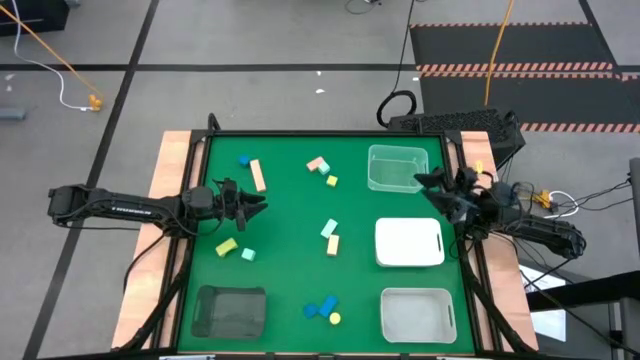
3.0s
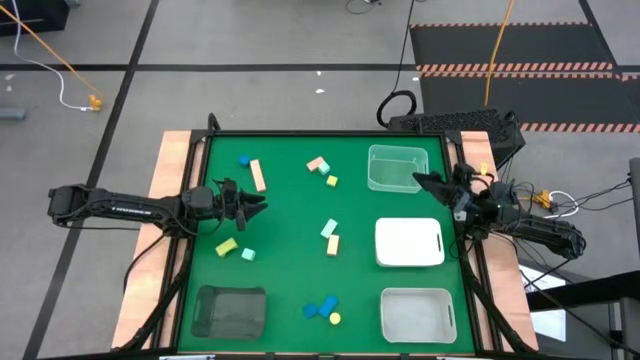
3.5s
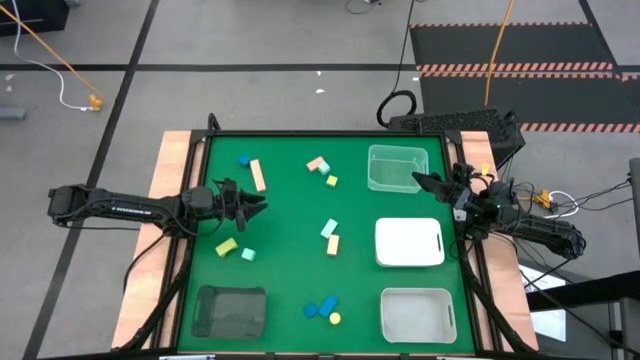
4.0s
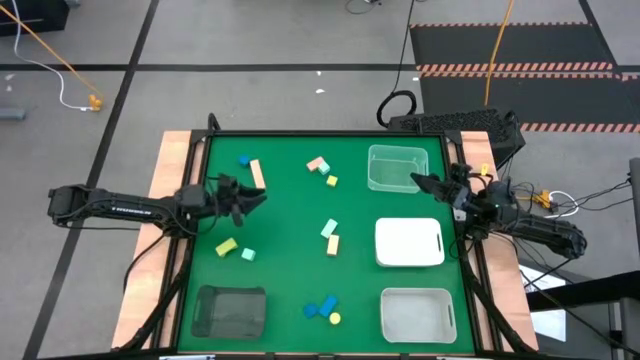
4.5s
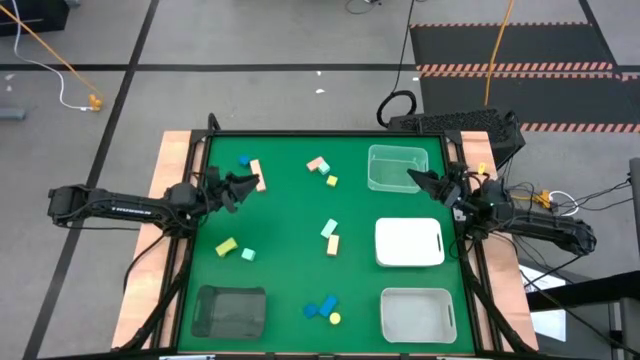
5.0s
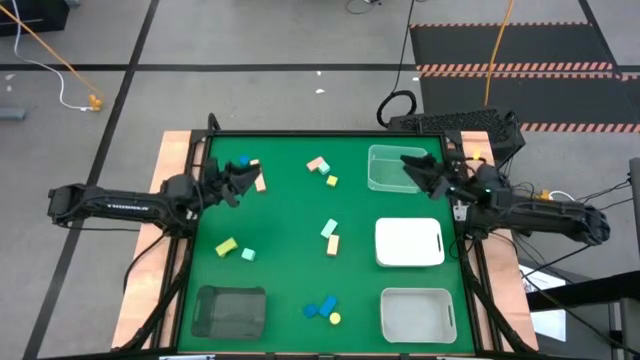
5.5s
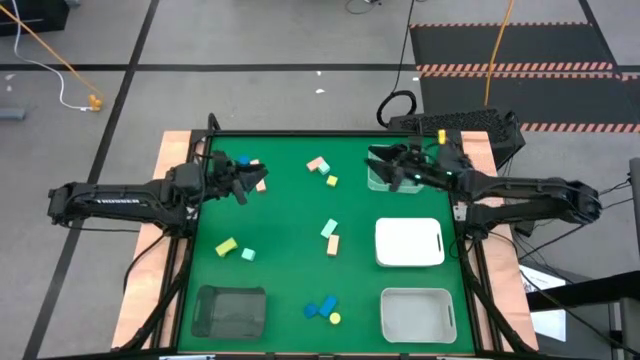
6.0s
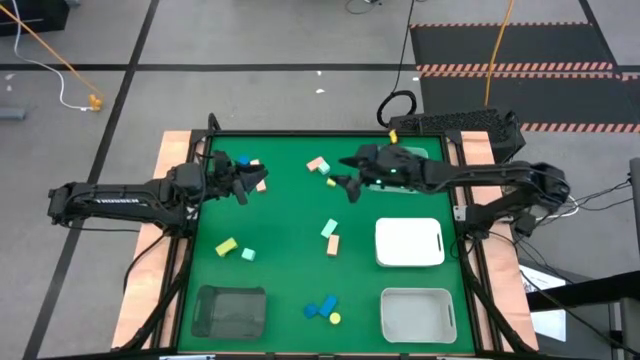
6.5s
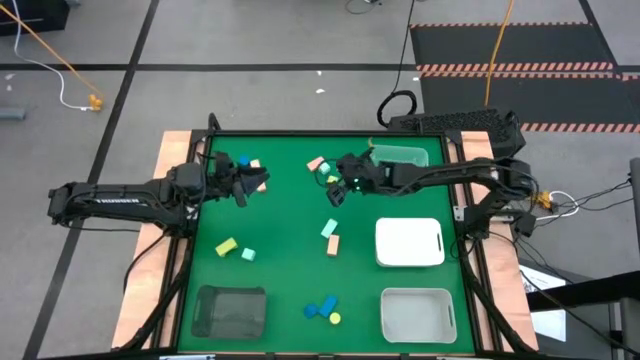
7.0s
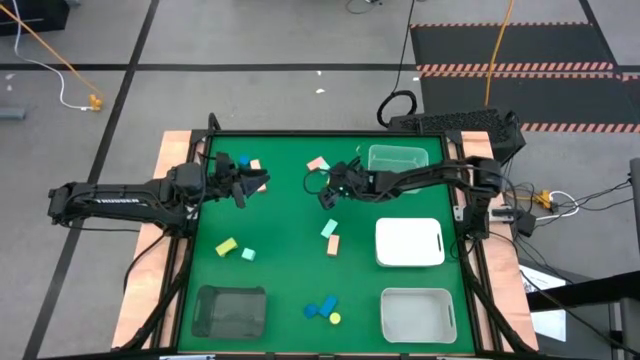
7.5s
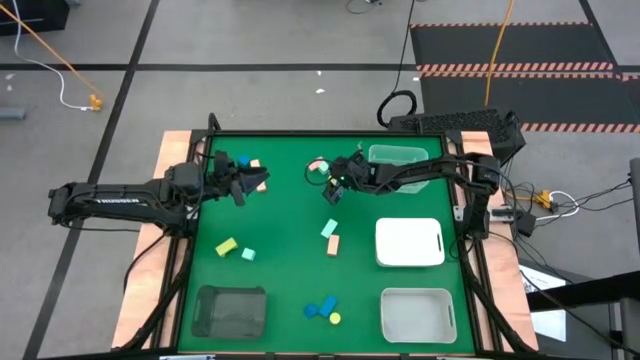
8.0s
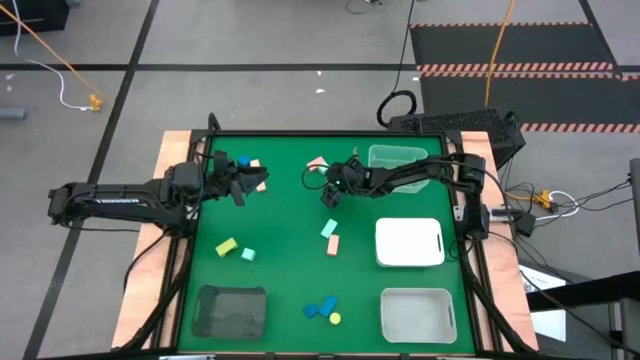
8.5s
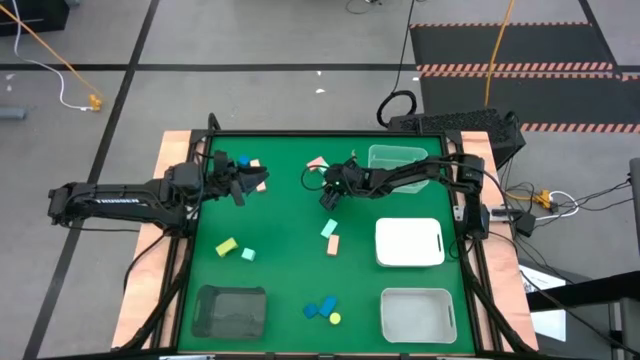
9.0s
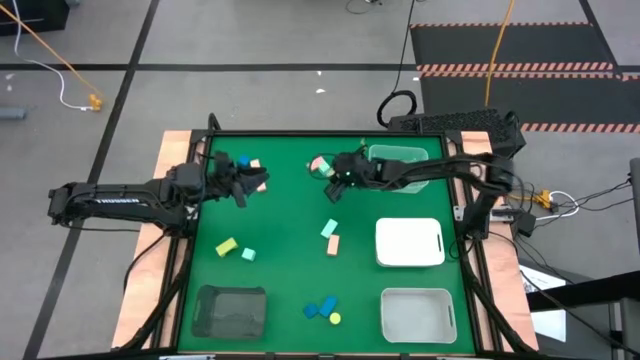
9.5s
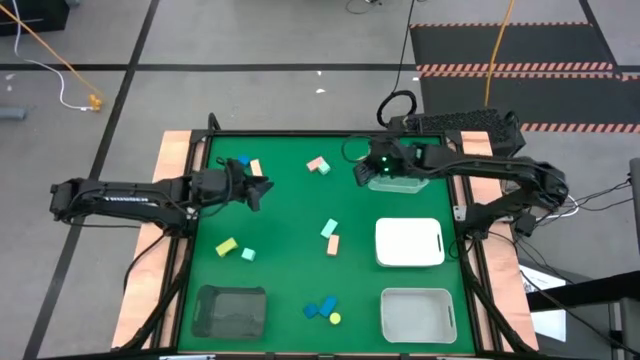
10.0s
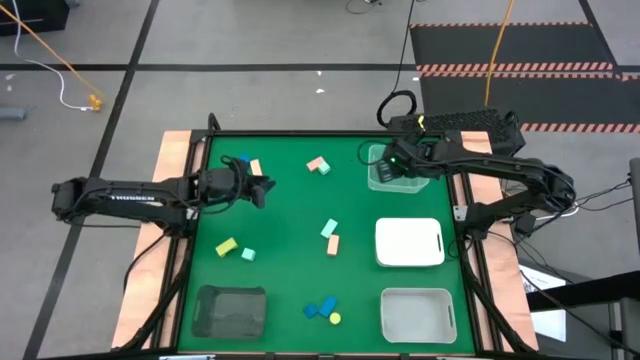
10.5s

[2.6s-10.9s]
Task: Sort & place blocks by color
Put the top yellow block into the transparent bin

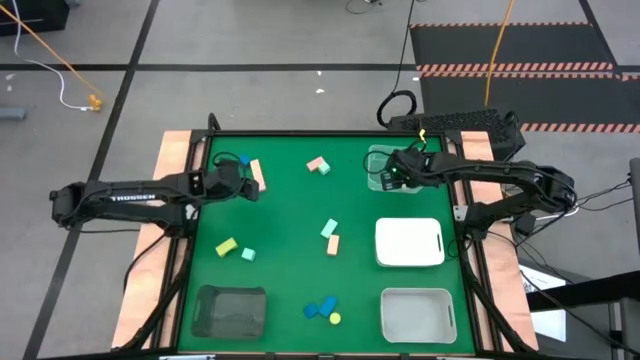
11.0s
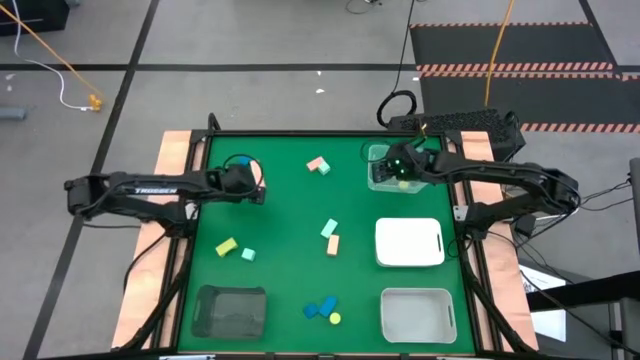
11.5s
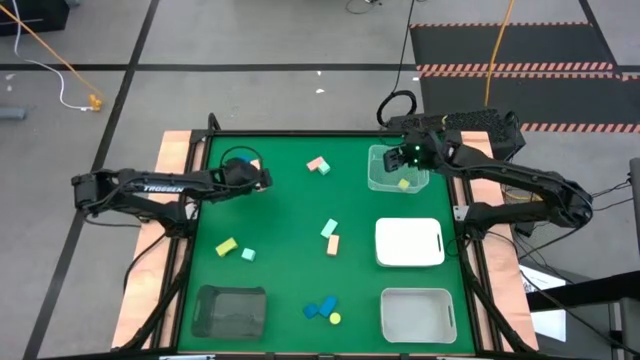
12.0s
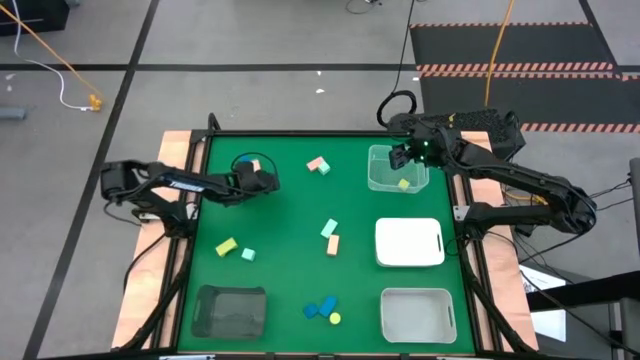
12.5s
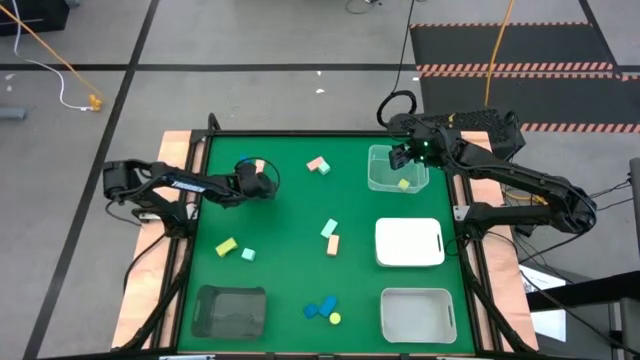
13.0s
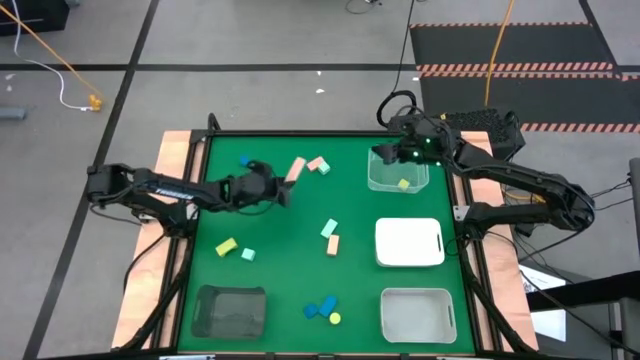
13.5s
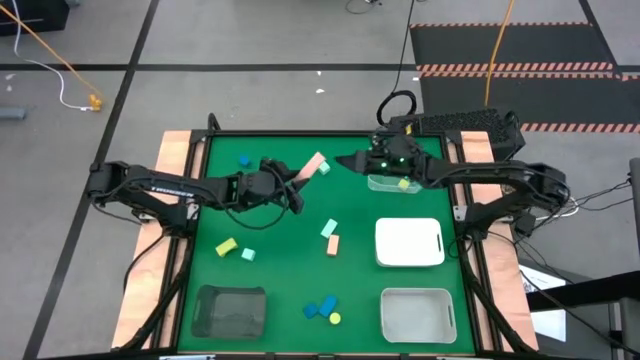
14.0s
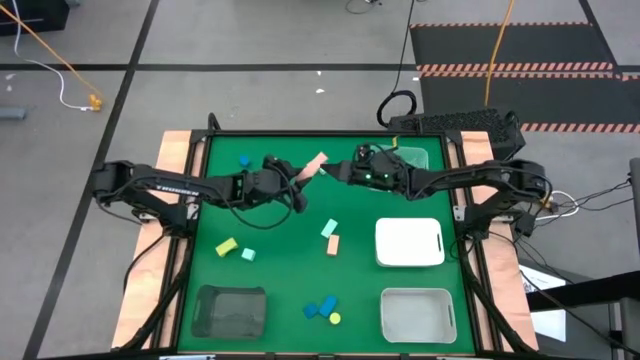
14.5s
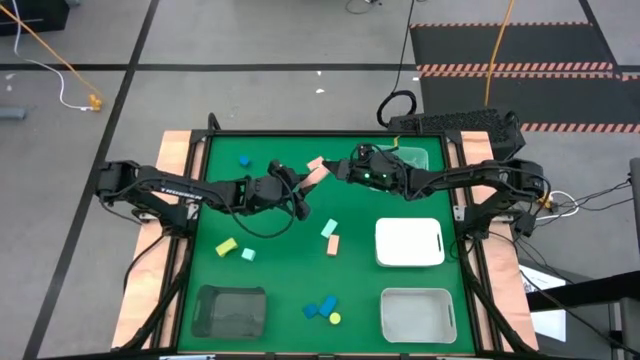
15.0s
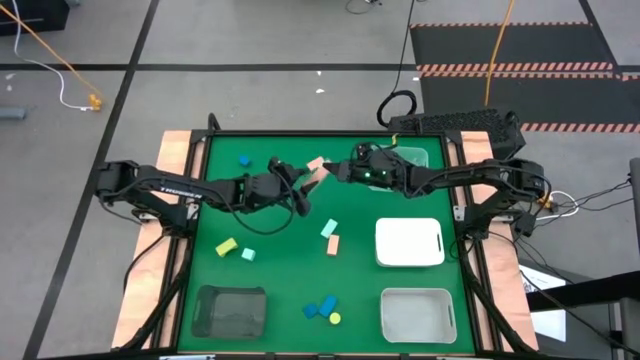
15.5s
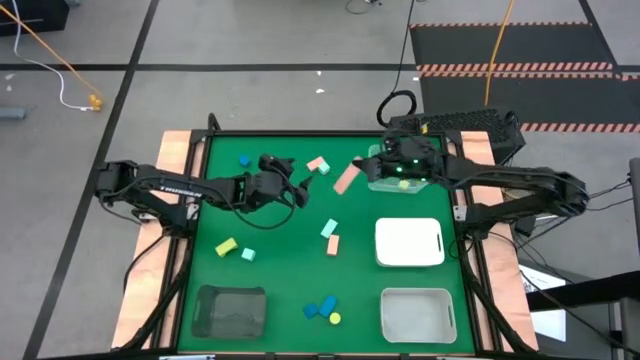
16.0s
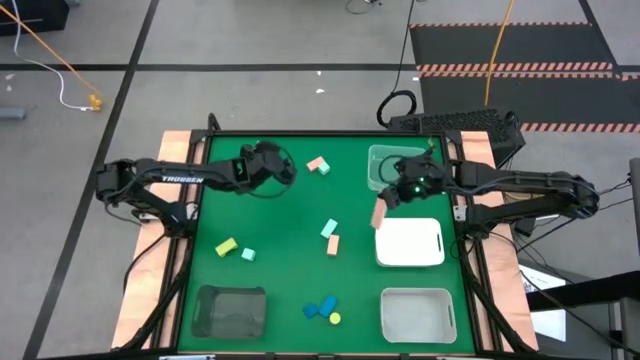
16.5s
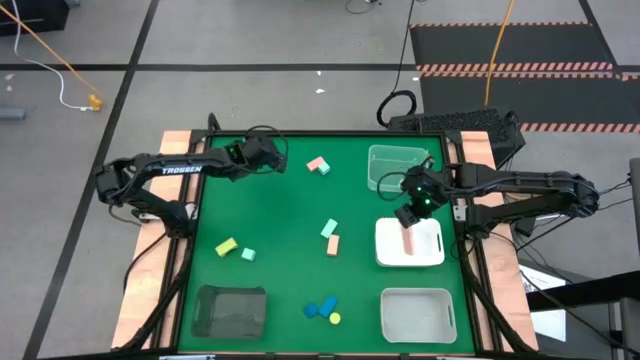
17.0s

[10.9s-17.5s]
Put the top left brown block into the white bin

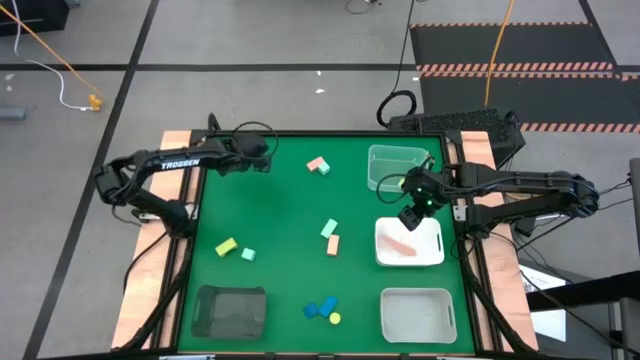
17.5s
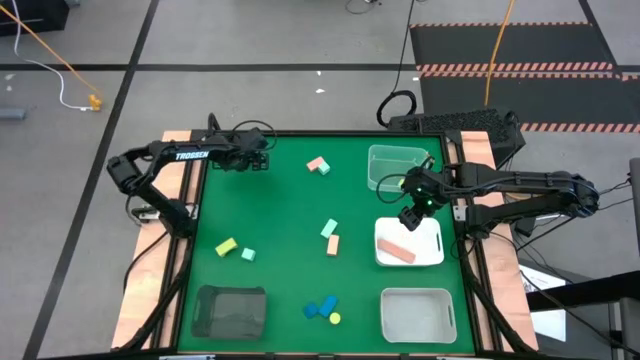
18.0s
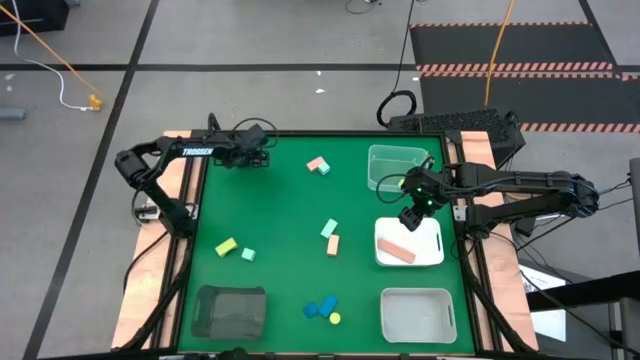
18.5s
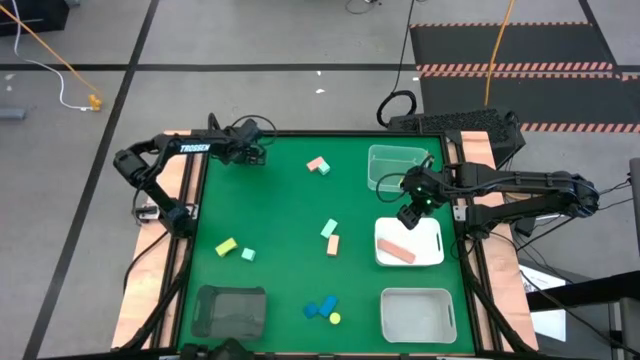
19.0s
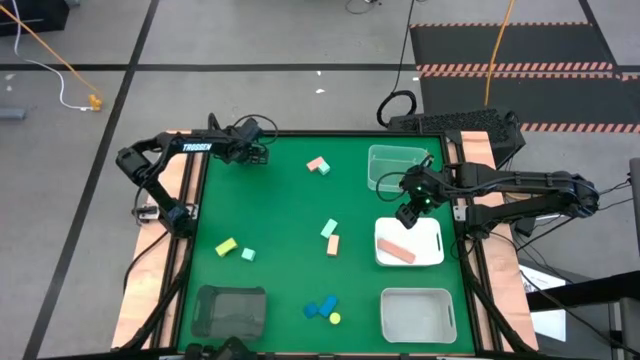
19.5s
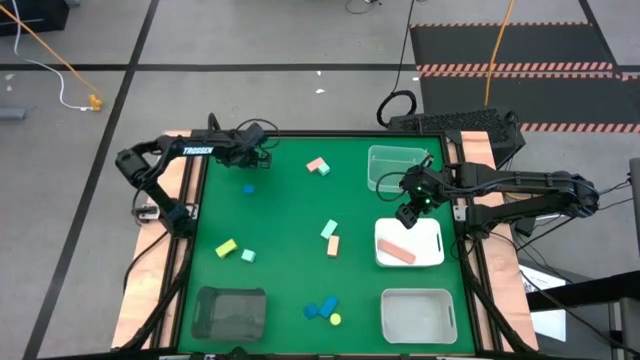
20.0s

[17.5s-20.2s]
Put the top blue block into the gray bin

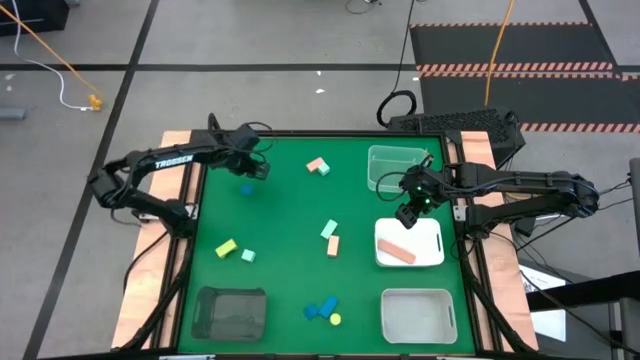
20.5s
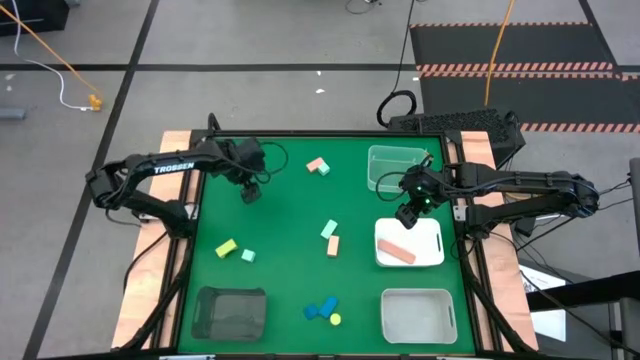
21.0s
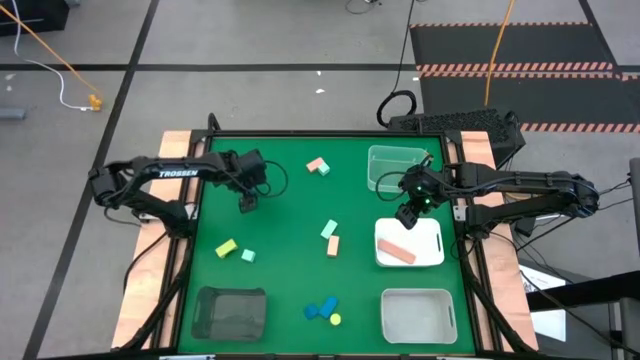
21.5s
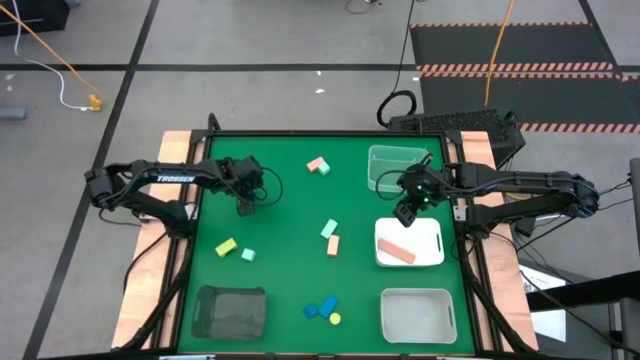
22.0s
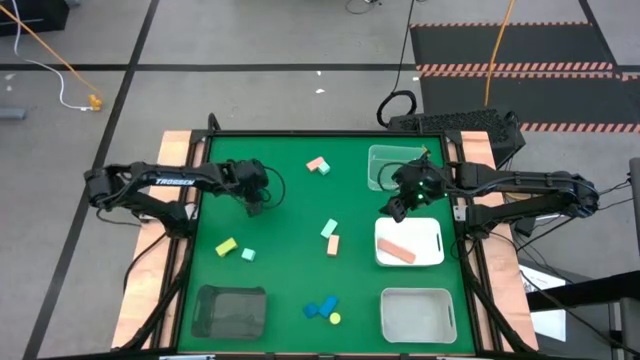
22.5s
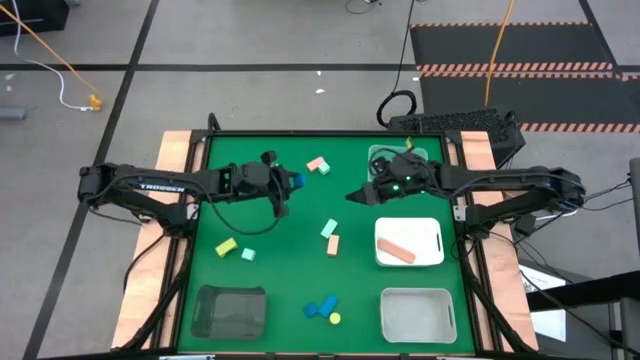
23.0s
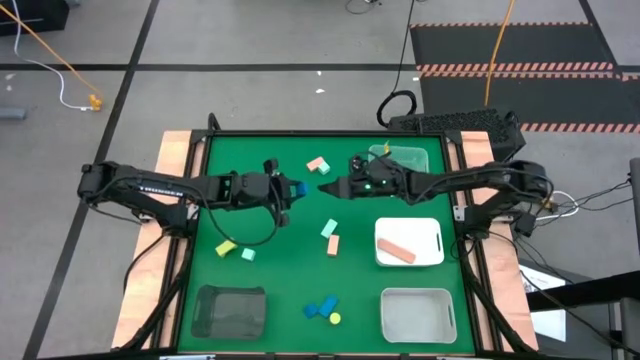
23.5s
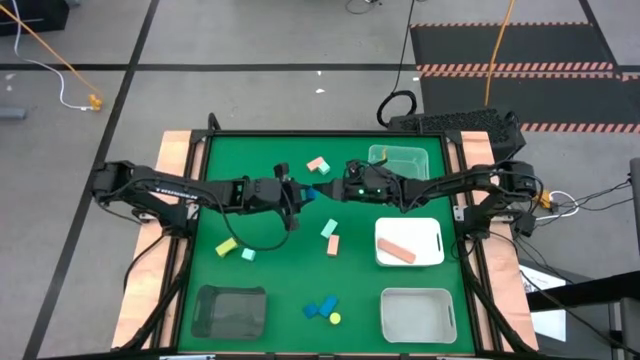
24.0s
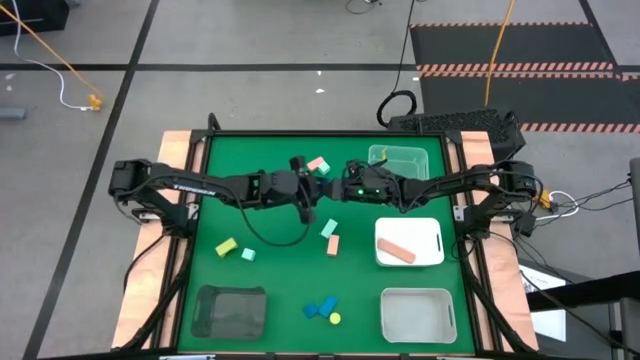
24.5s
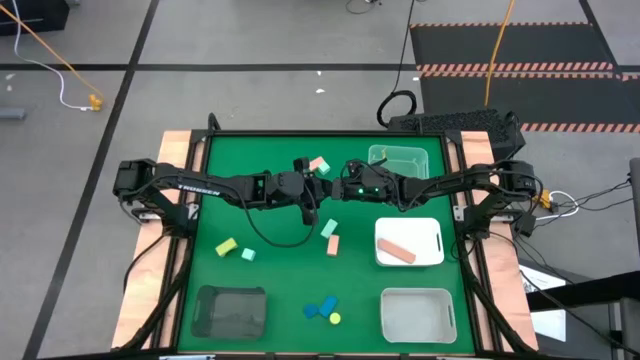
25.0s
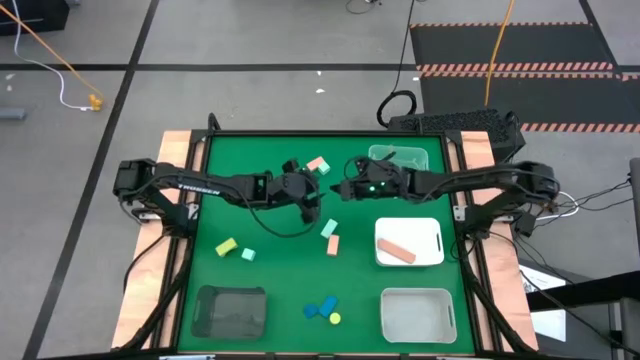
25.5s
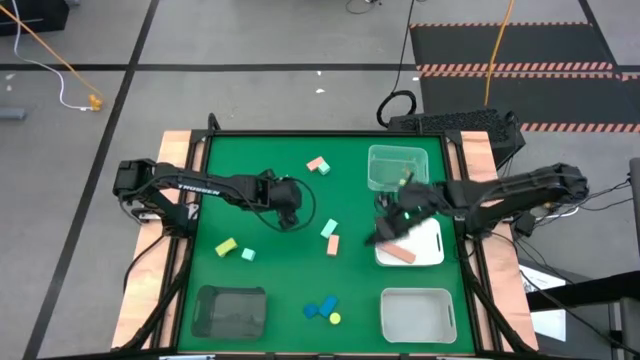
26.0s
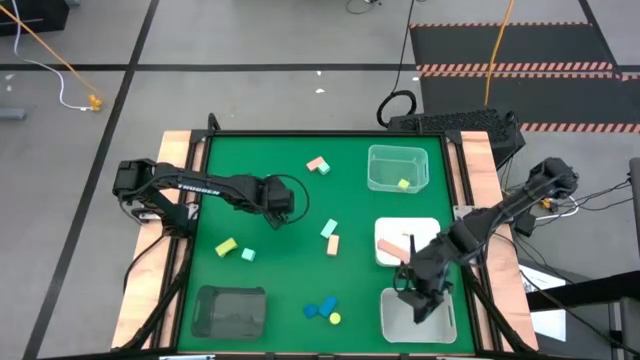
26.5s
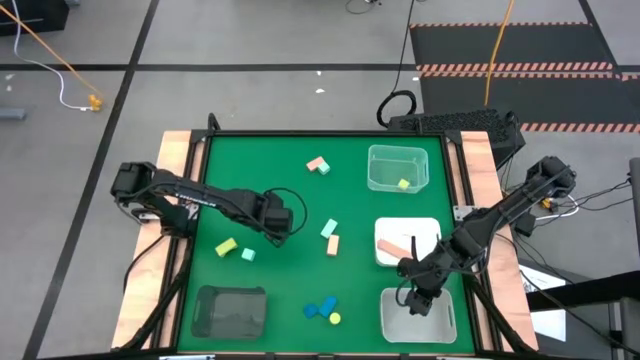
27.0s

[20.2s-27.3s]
Put the top blue block into the gray bin
